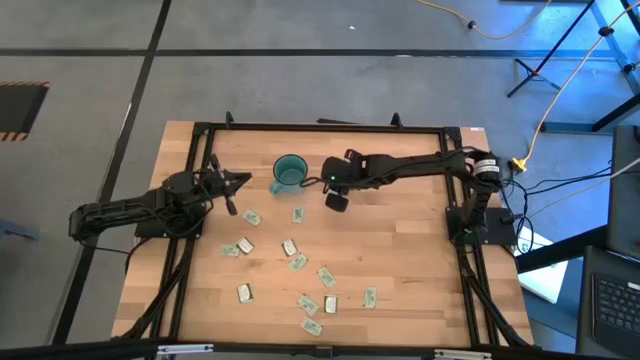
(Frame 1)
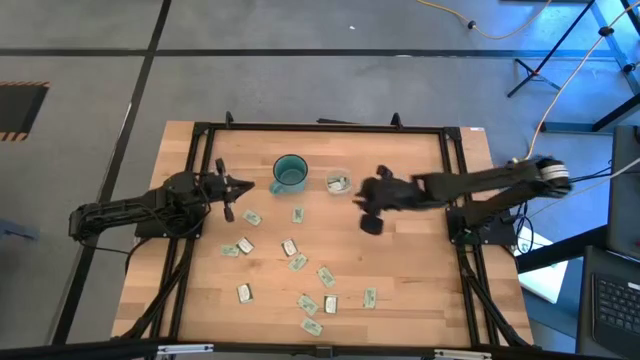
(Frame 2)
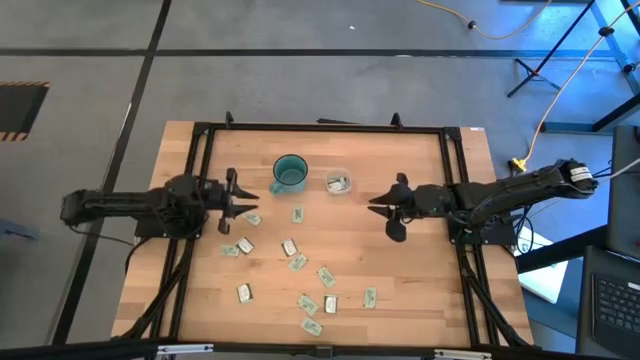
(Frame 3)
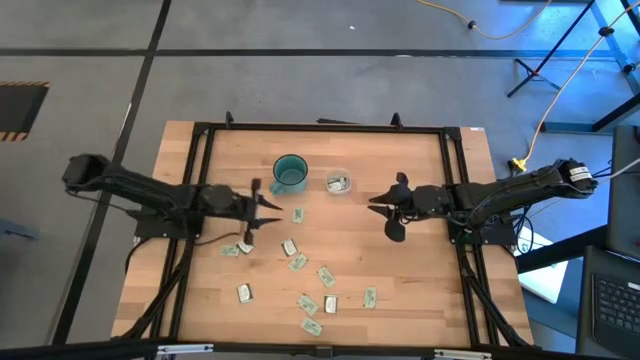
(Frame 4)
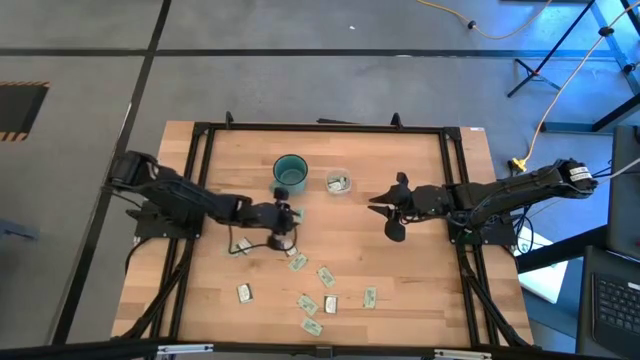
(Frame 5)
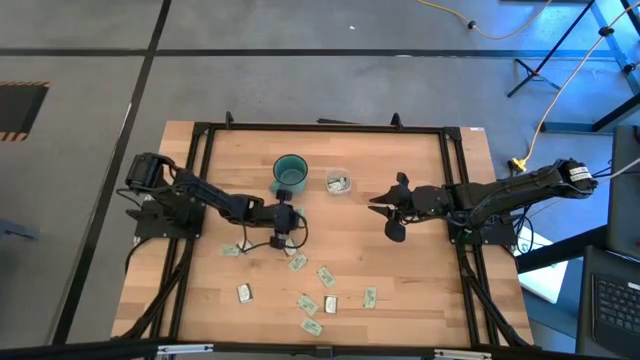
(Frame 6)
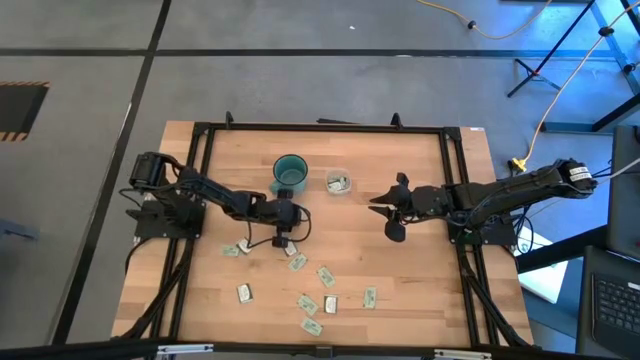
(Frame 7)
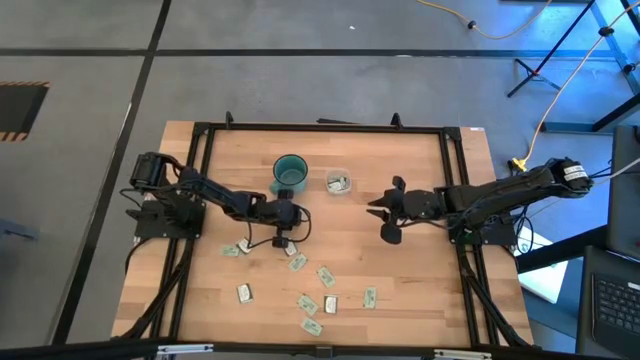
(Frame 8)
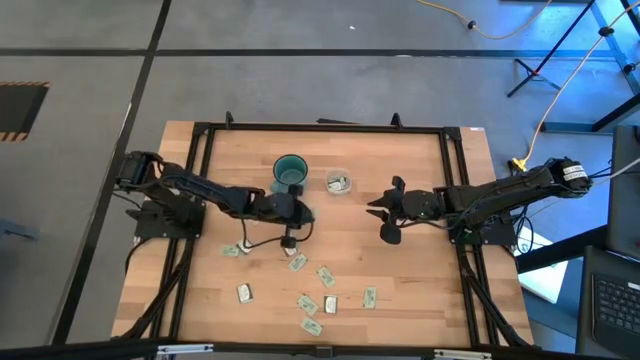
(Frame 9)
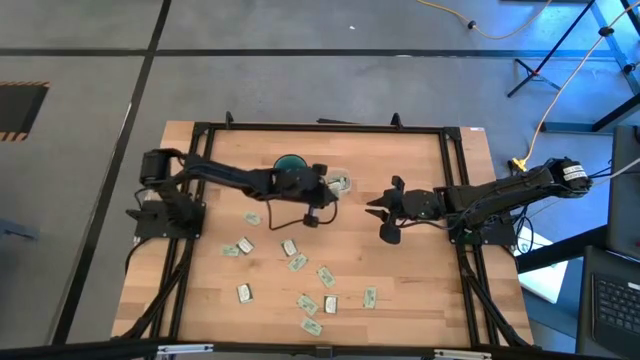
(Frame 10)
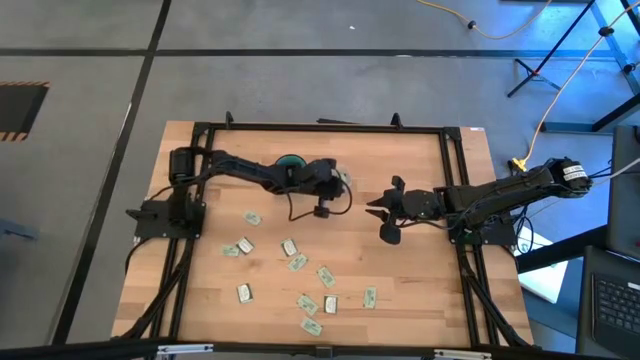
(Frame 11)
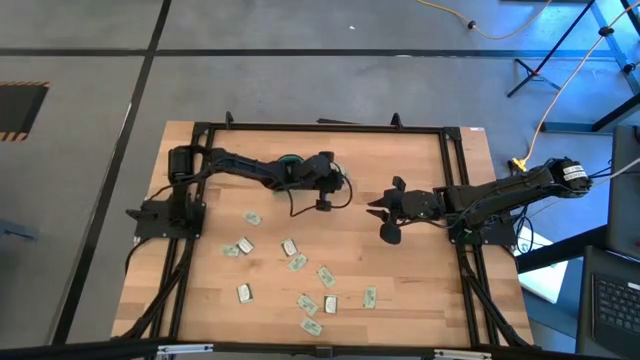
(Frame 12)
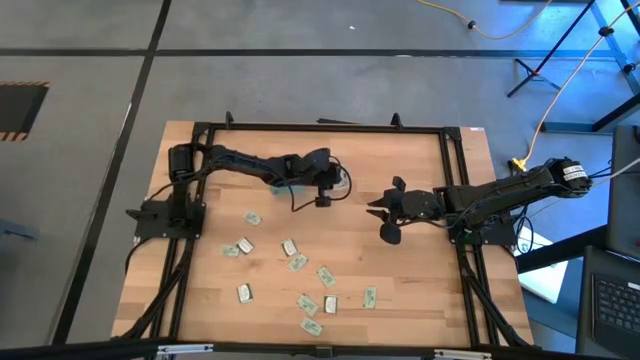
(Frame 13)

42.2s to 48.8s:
Task: Pick and place items into bin
Put the white stevia packet into the transparent bin

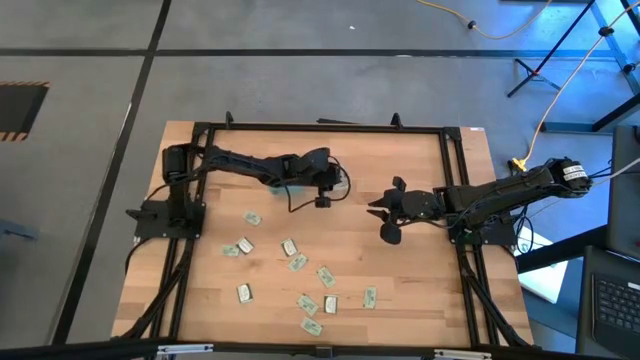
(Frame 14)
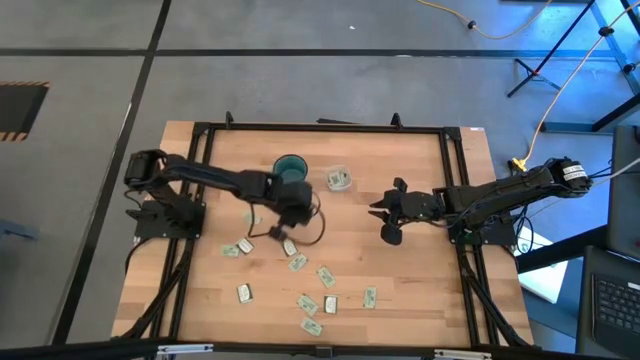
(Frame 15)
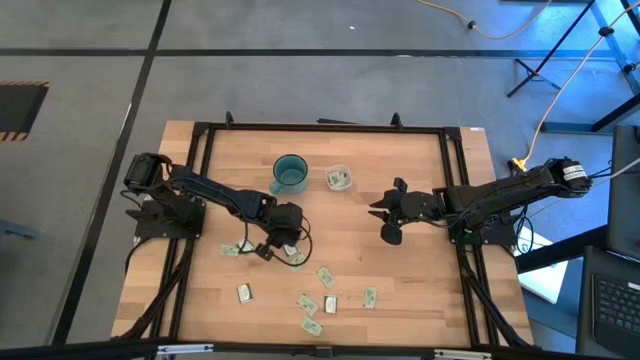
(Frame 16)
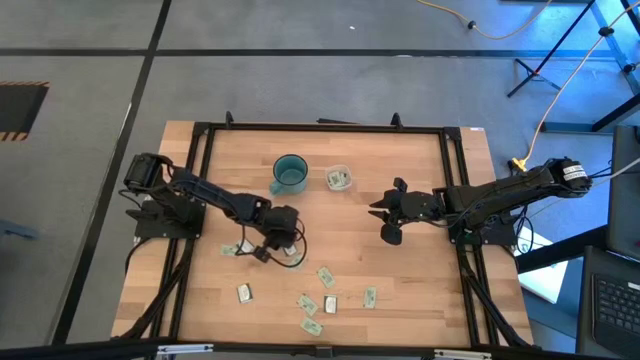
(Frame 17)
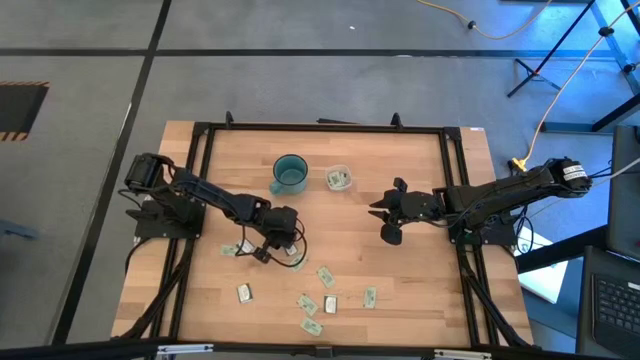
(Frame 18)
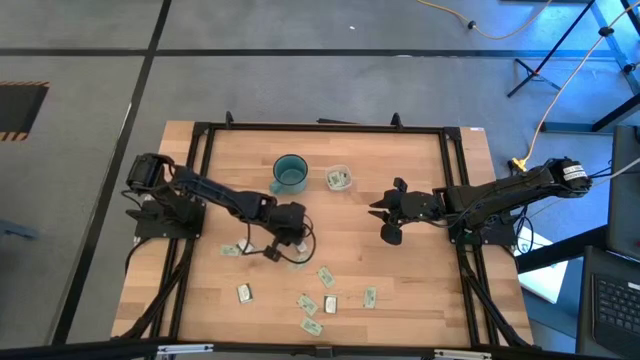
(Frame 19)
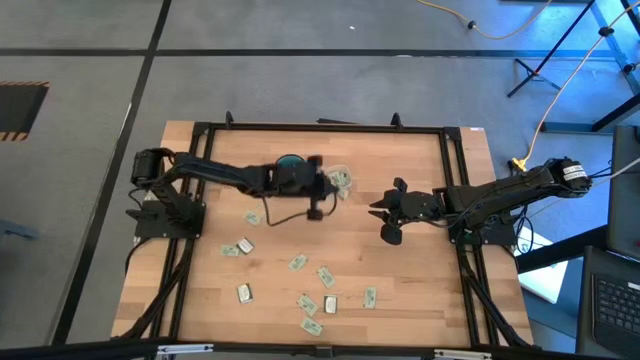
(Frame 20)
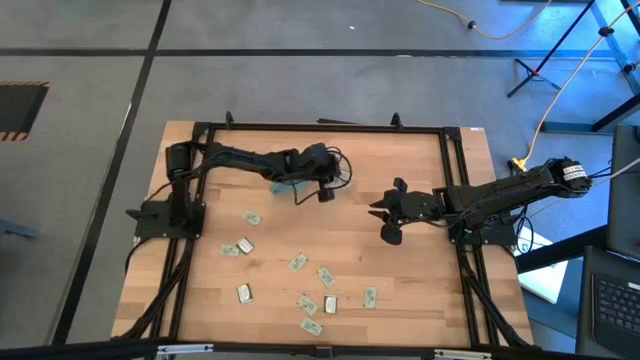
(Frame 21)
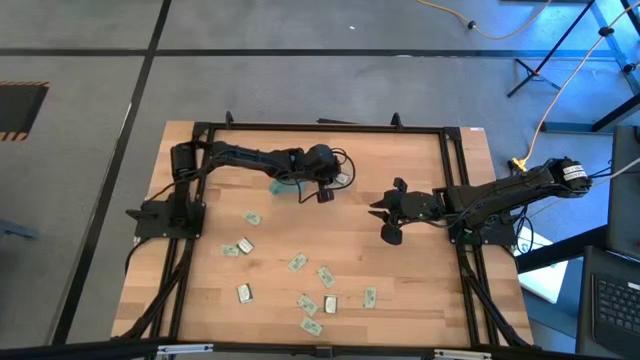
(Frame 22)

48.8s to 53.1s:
Put the green stevia packet into the transparent bin

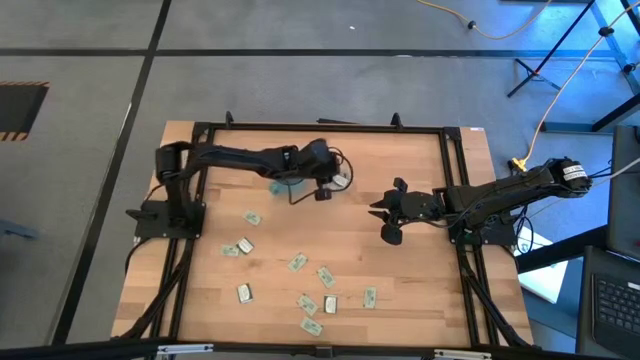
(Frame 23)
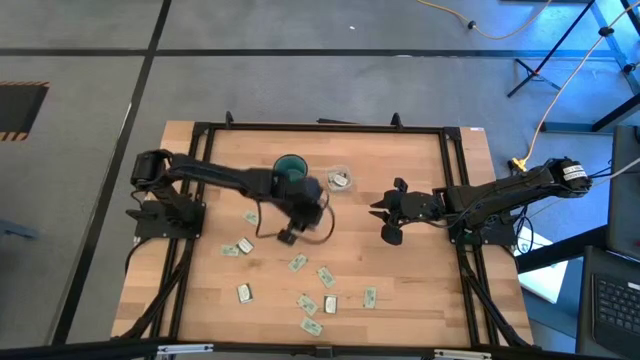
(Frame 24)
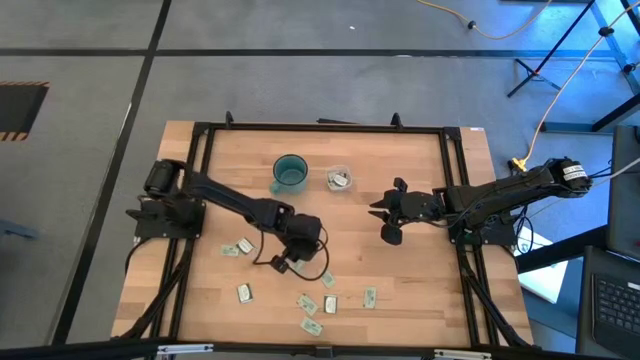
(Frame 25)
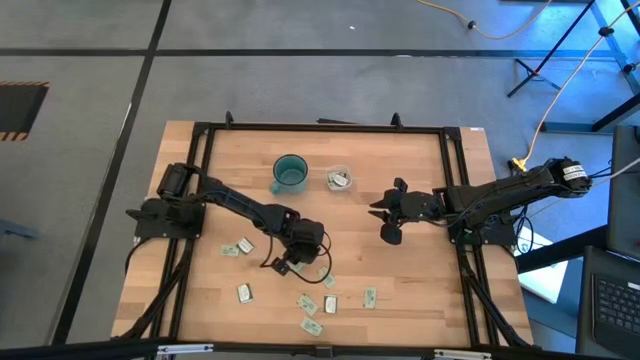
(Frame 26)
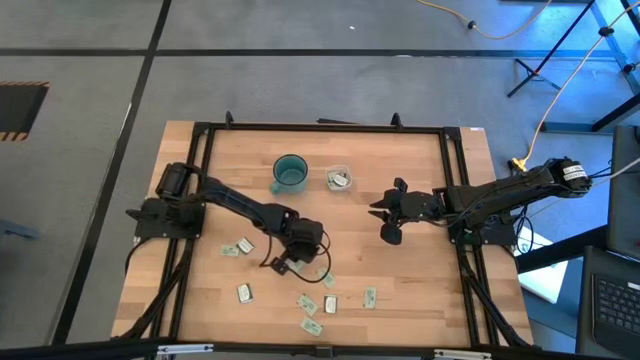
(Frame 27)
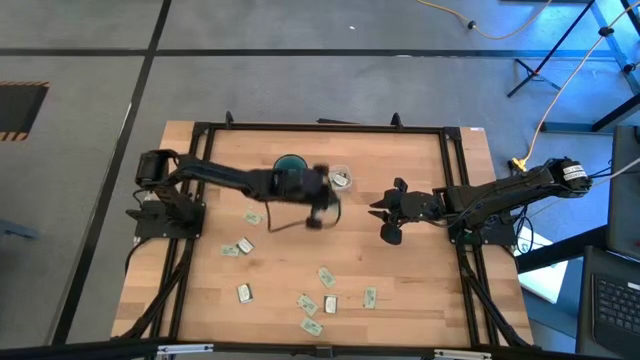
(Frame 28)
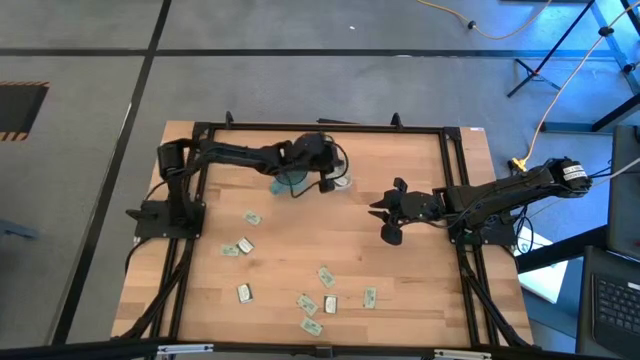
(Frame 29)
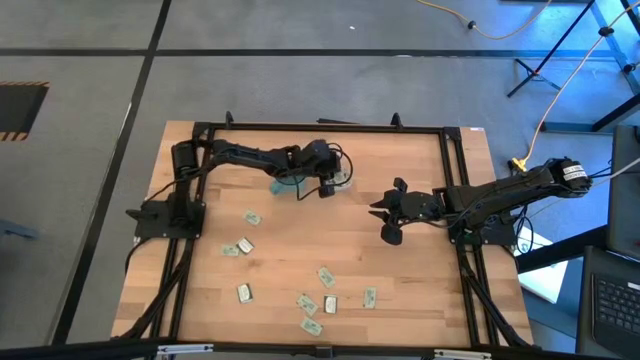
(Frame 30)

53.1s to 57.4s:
Put the white stevia packet into the transparent bin

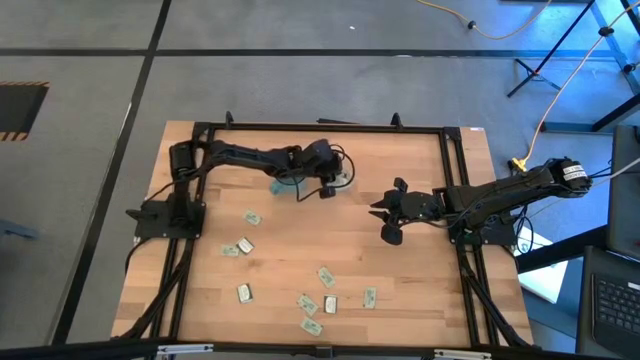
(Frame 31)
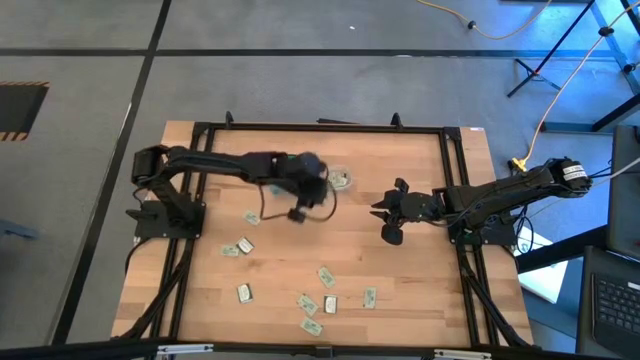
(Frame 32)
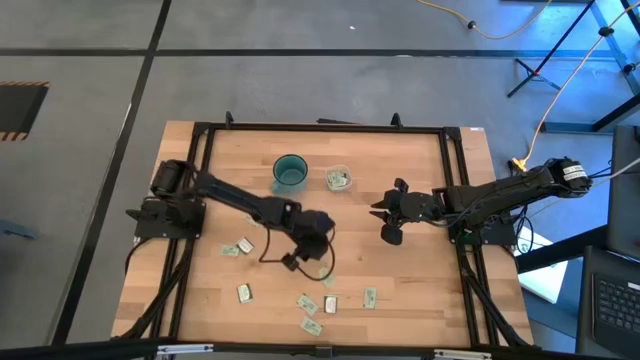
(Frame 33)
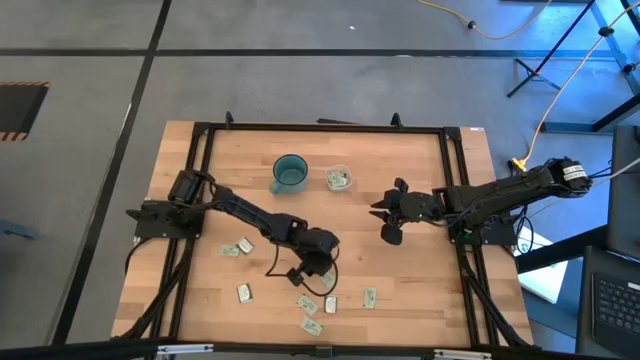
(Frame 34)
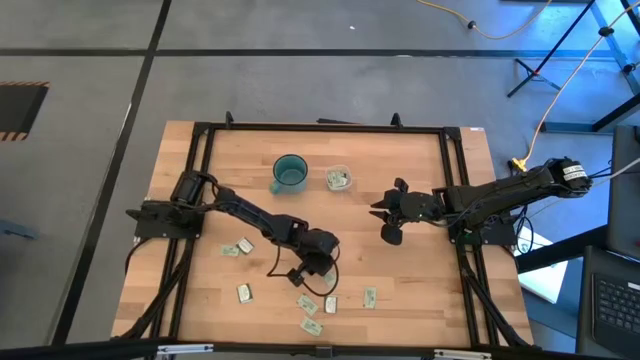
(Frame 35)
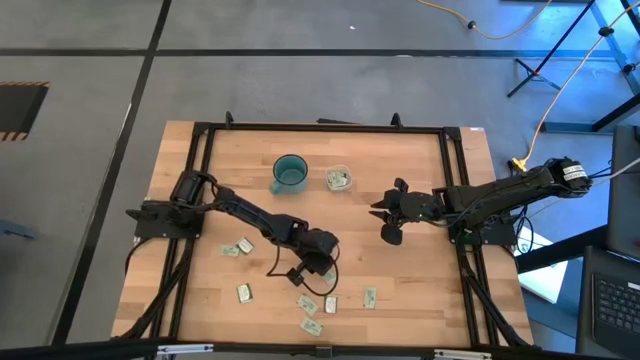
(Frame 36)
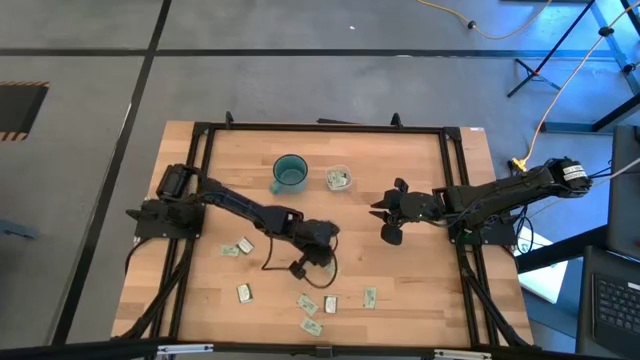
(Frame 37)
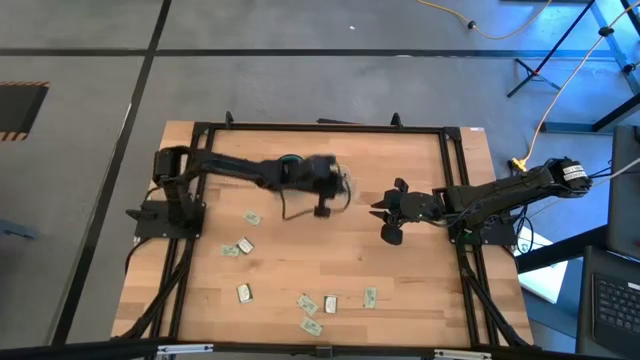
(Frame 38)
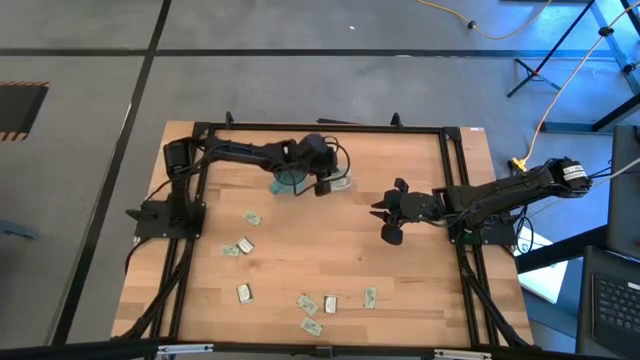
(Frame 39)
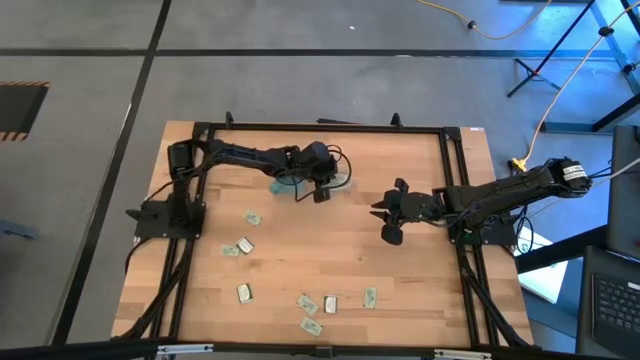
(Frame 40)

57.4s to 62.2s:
Put the white stevia packet into the transparent bin

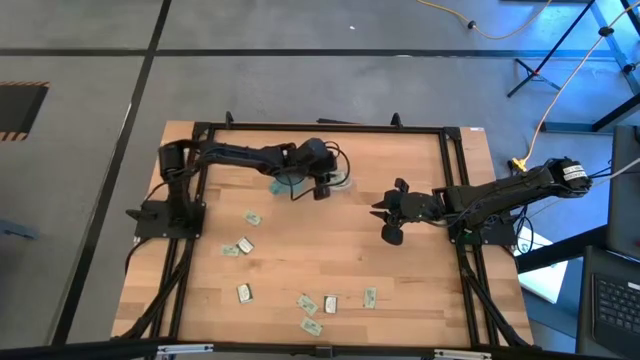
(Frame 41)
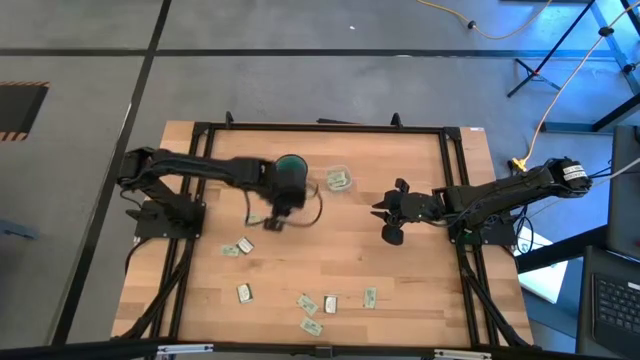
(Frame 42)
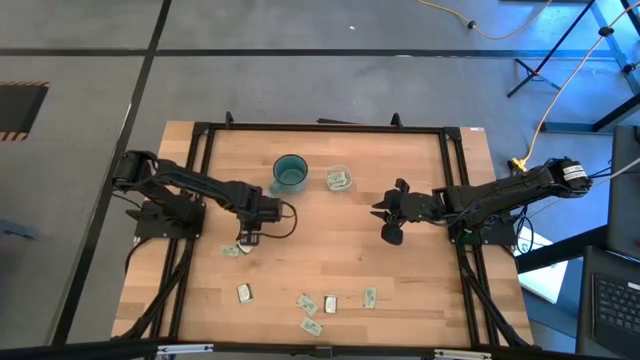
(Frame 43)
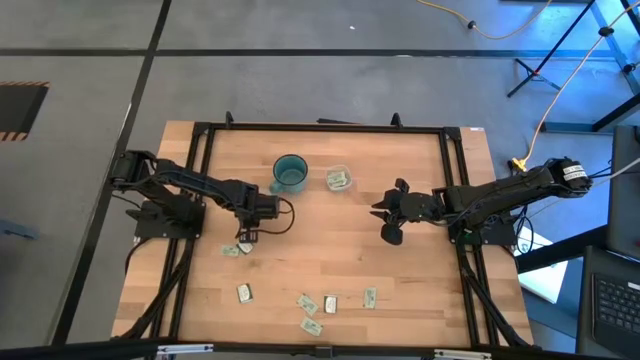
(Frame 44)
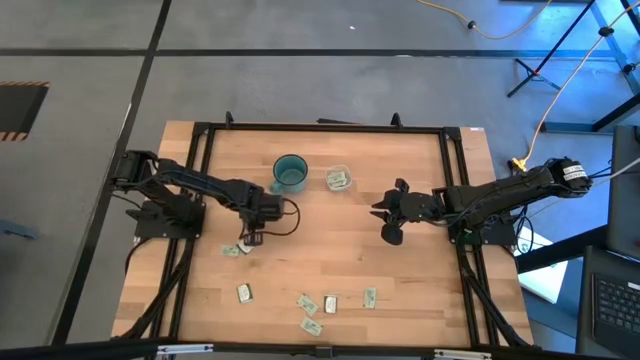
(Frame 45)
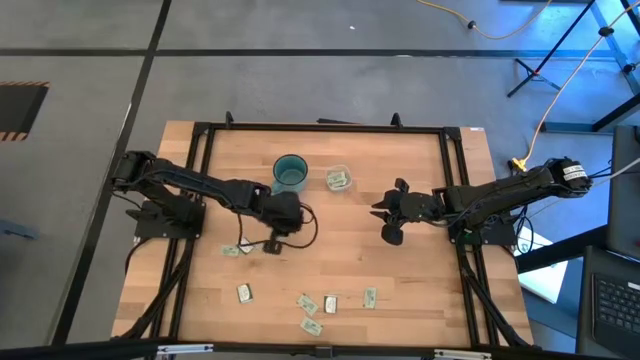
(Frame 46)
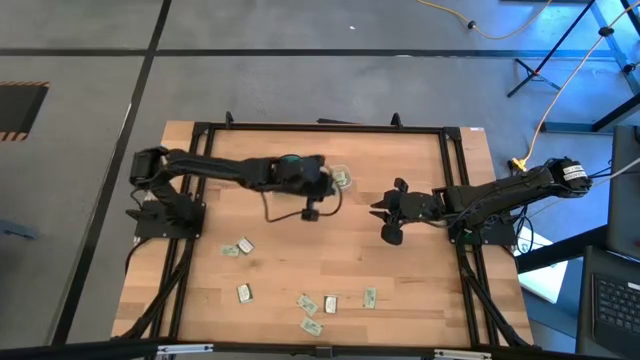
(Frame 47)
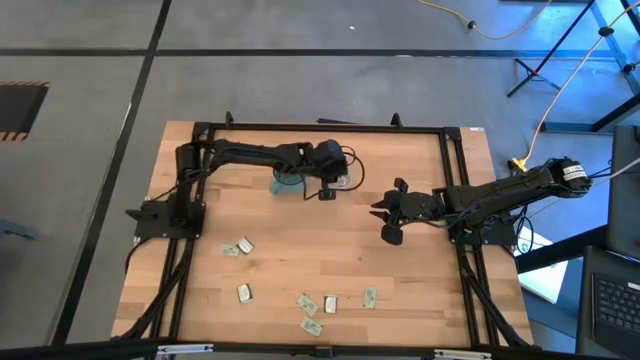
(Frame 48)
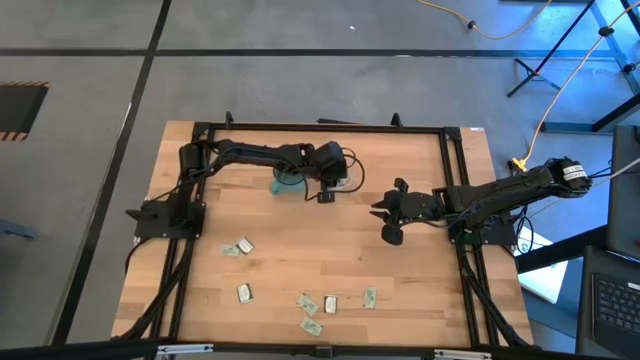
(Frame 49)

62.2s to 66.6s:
Put the white stevia packet into the transparent bin
